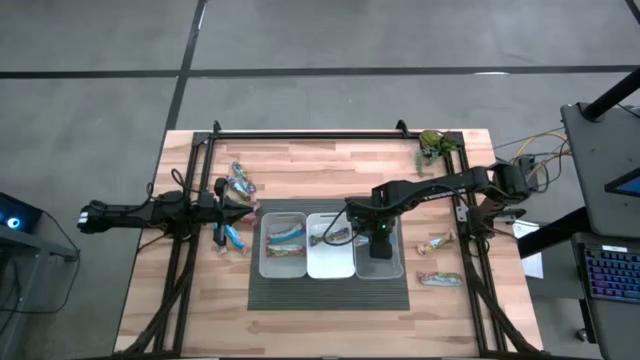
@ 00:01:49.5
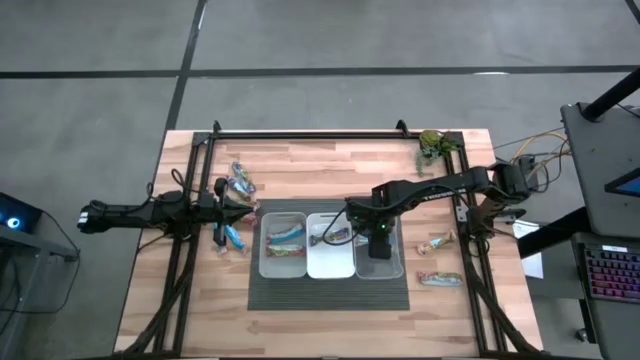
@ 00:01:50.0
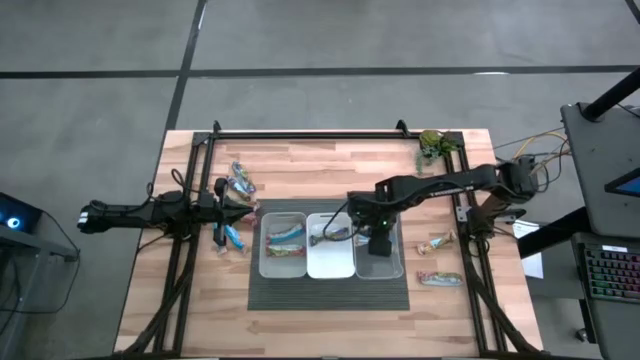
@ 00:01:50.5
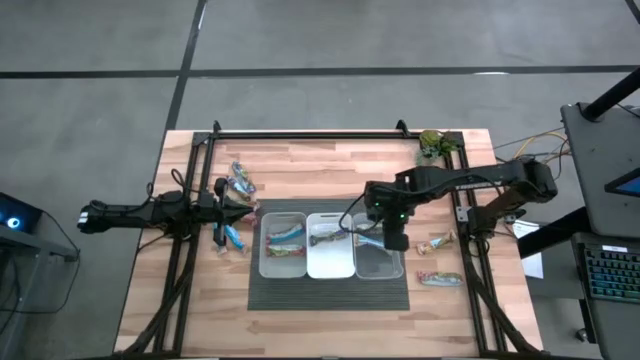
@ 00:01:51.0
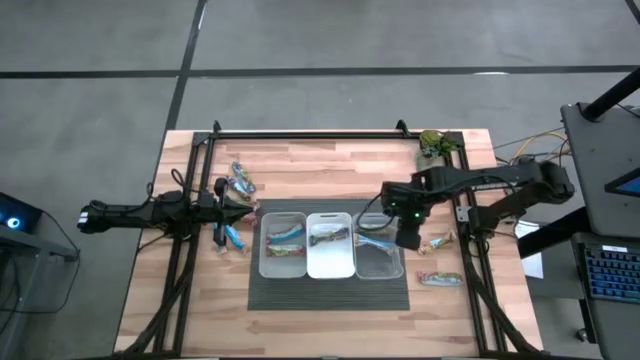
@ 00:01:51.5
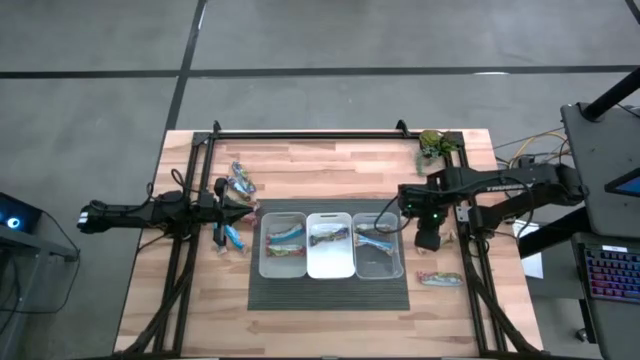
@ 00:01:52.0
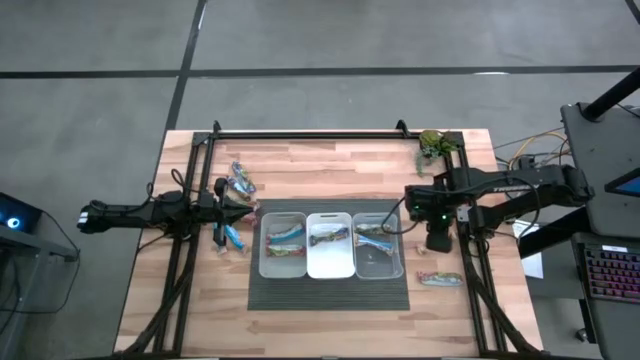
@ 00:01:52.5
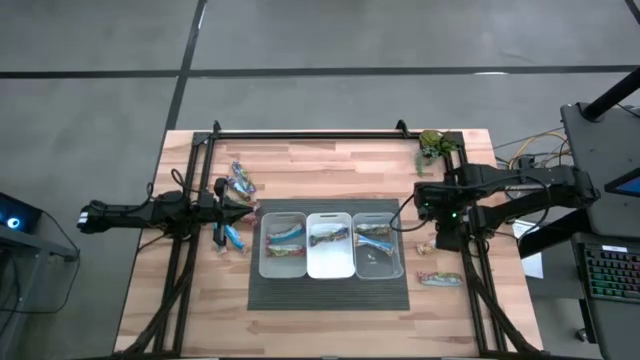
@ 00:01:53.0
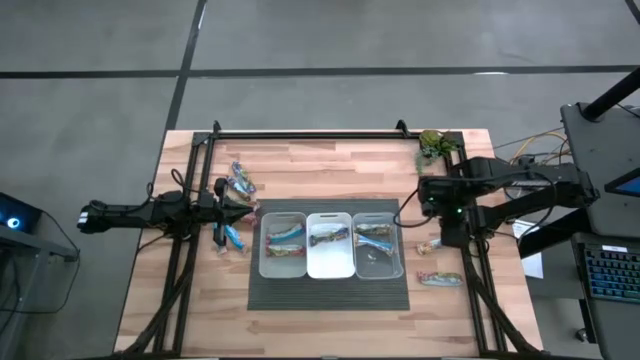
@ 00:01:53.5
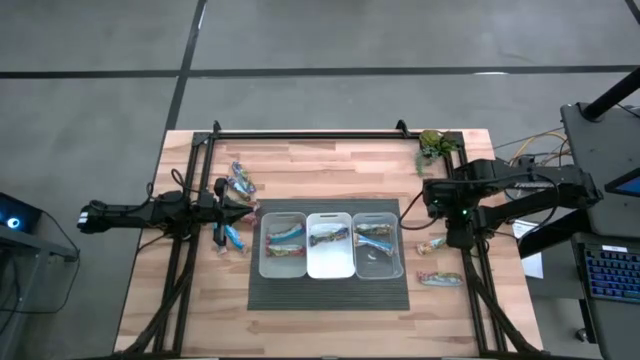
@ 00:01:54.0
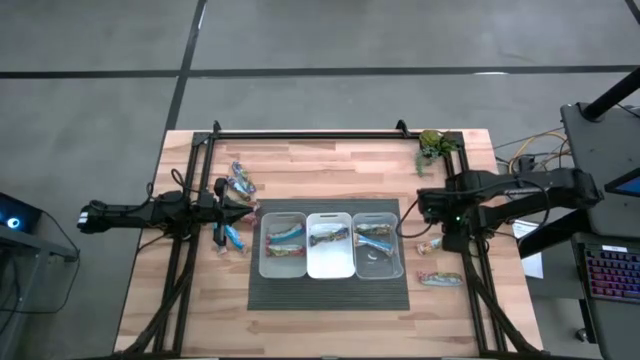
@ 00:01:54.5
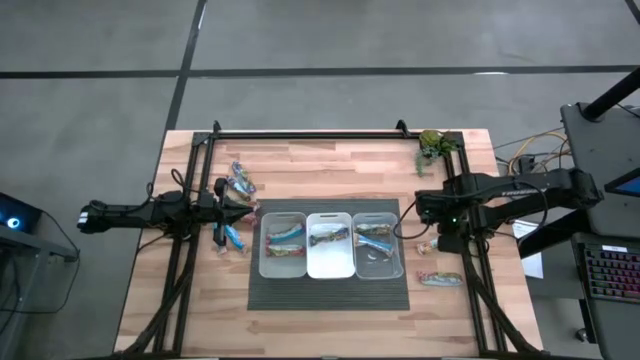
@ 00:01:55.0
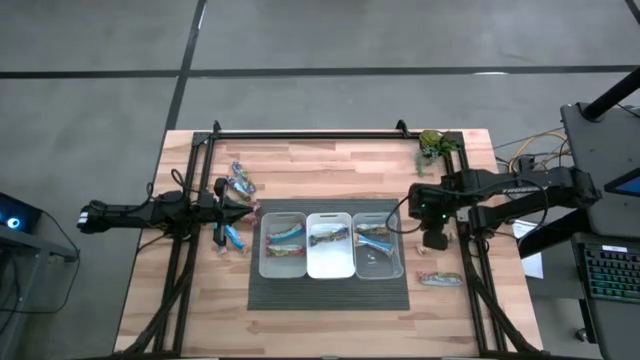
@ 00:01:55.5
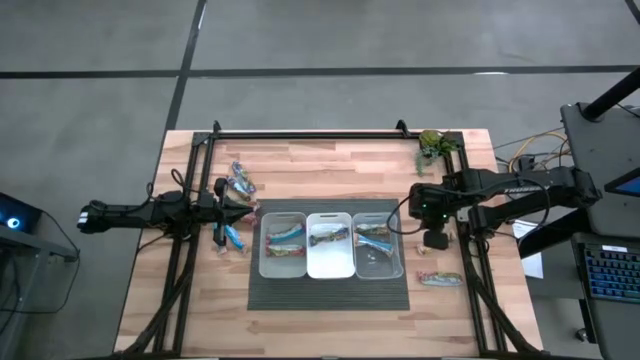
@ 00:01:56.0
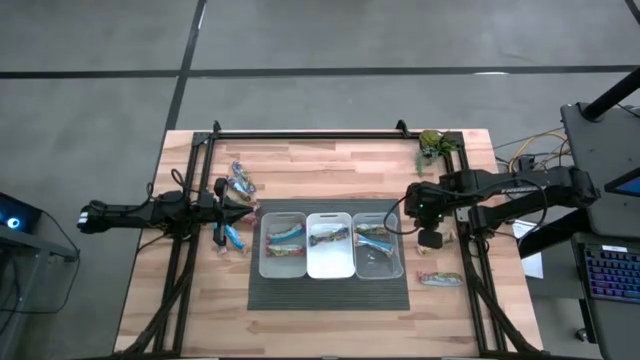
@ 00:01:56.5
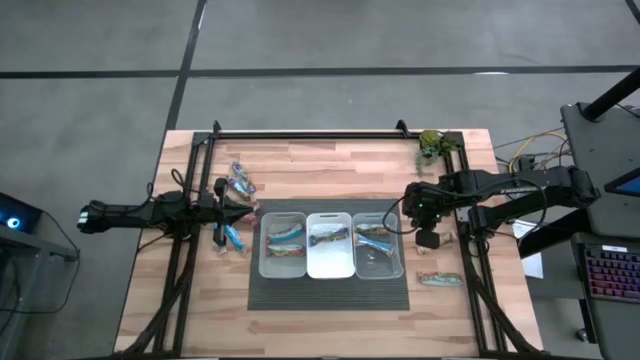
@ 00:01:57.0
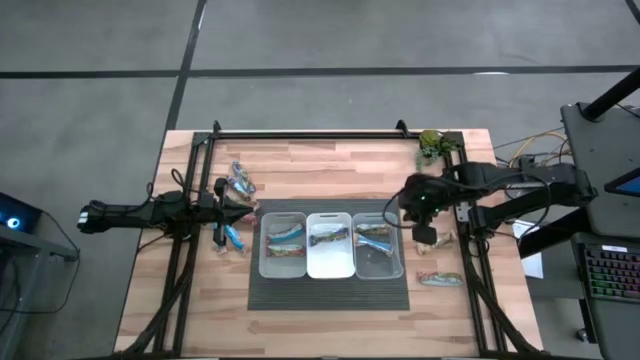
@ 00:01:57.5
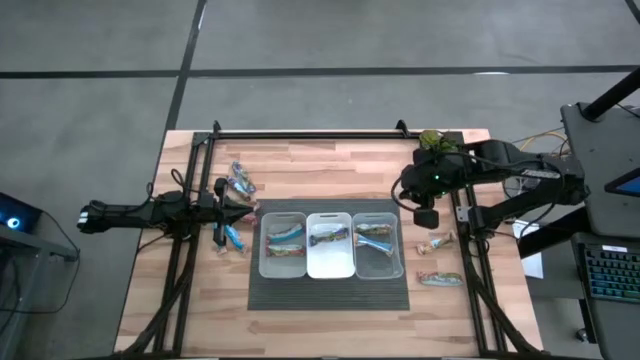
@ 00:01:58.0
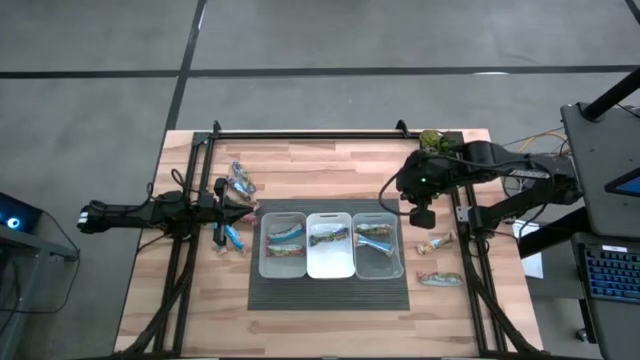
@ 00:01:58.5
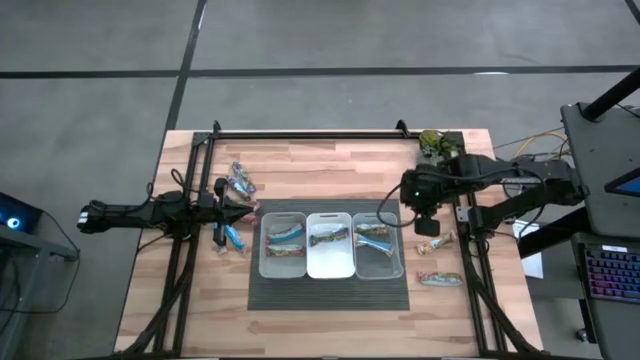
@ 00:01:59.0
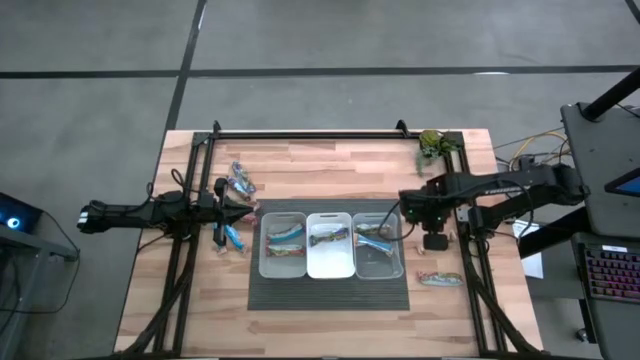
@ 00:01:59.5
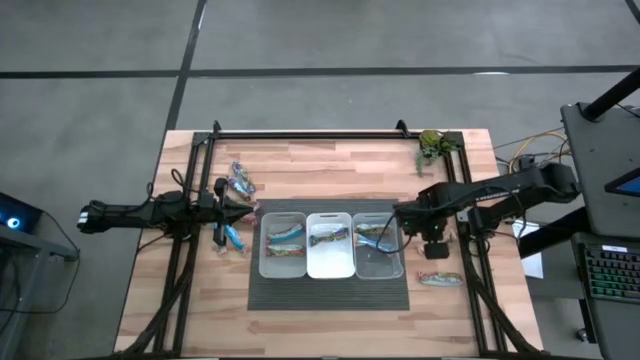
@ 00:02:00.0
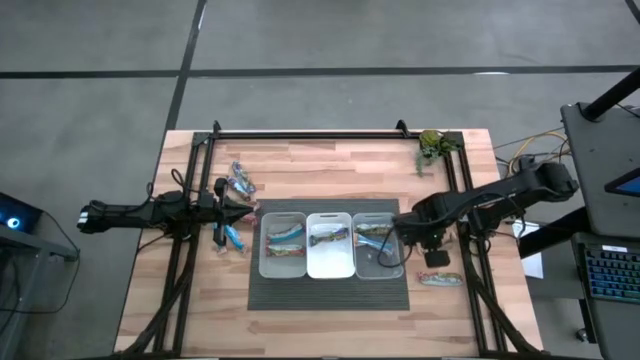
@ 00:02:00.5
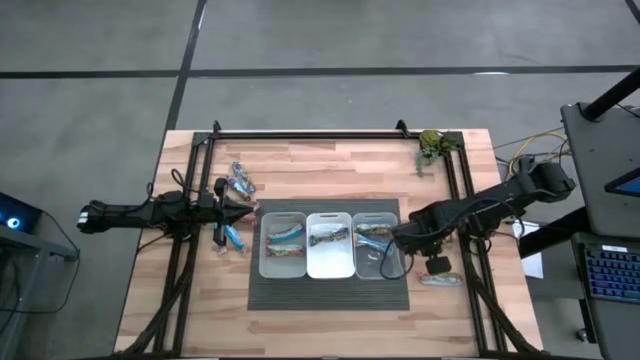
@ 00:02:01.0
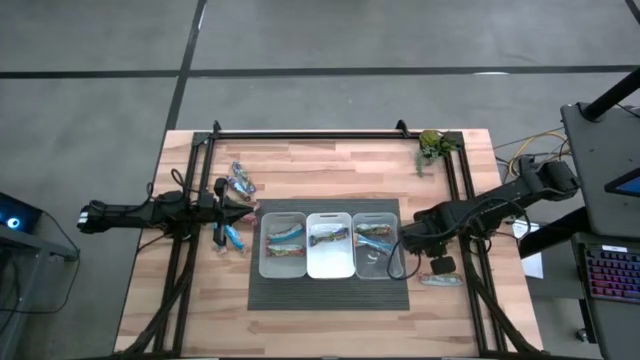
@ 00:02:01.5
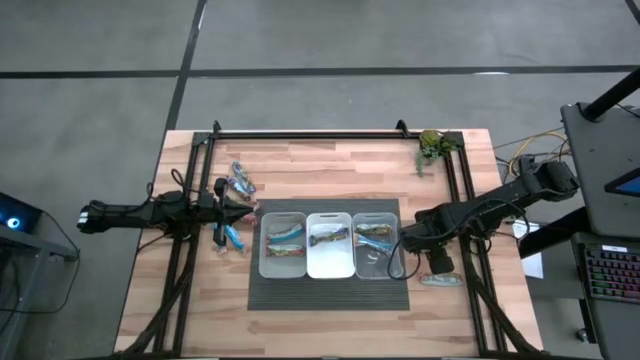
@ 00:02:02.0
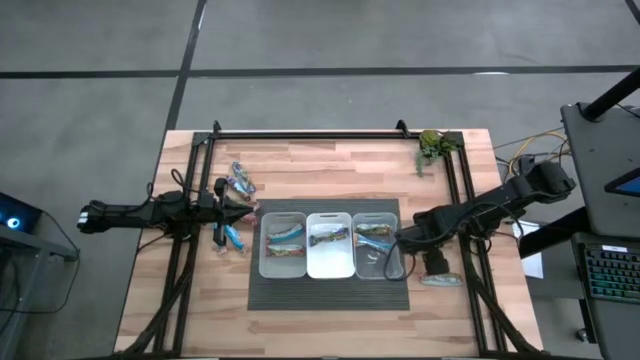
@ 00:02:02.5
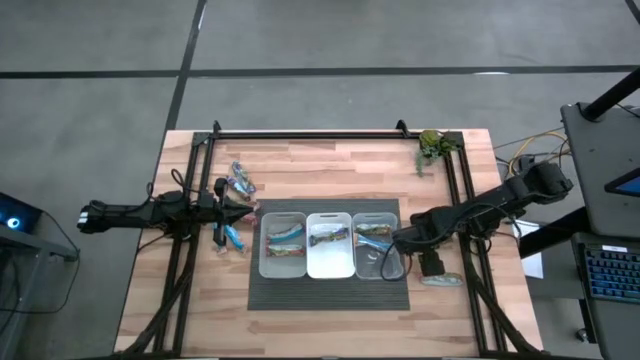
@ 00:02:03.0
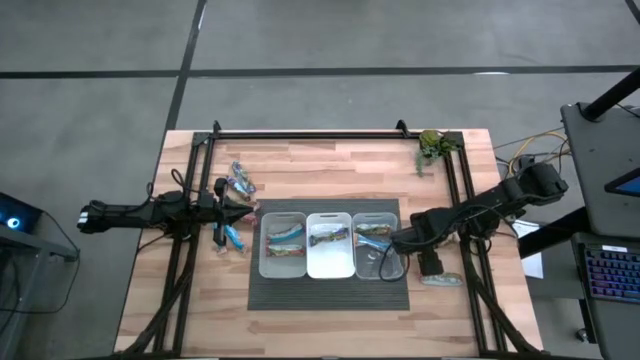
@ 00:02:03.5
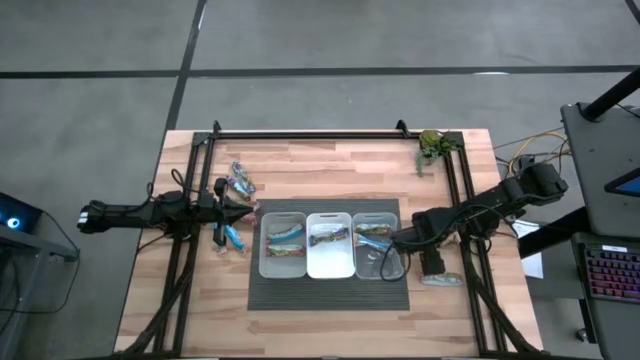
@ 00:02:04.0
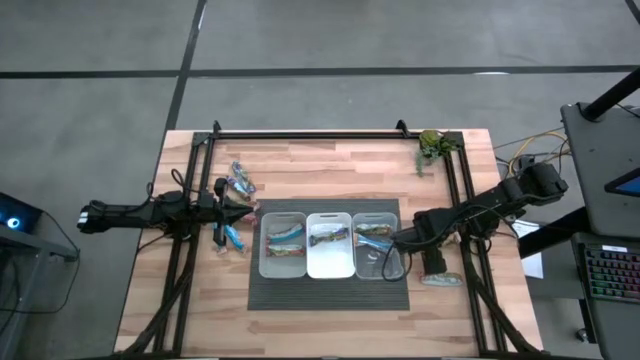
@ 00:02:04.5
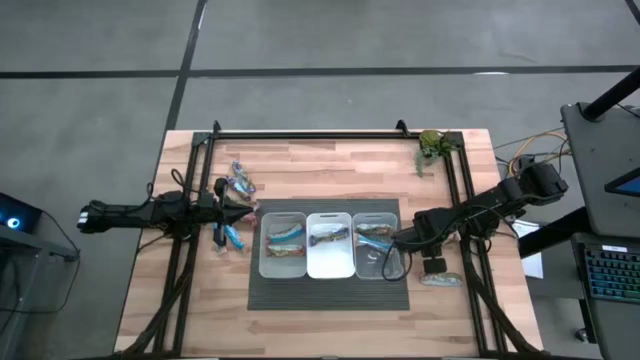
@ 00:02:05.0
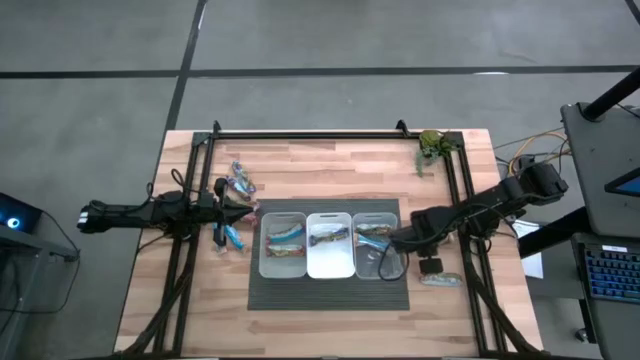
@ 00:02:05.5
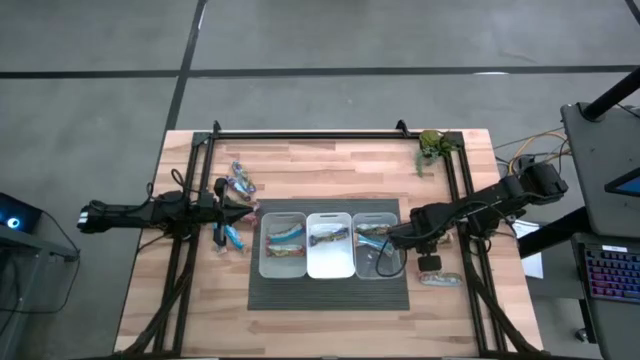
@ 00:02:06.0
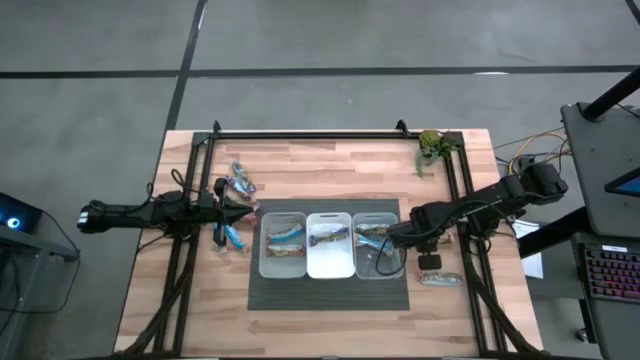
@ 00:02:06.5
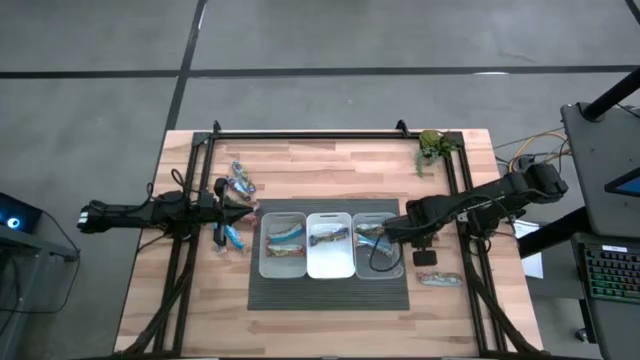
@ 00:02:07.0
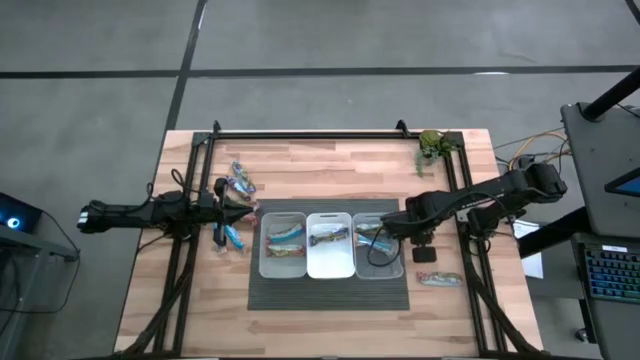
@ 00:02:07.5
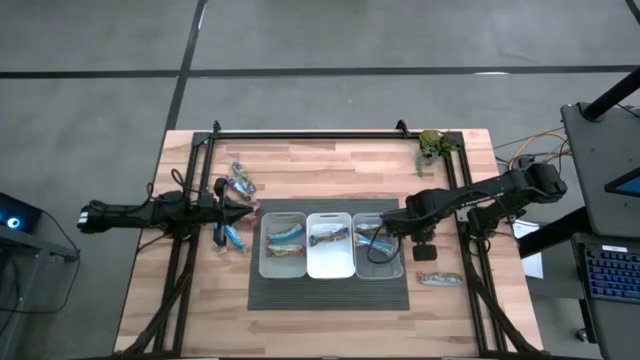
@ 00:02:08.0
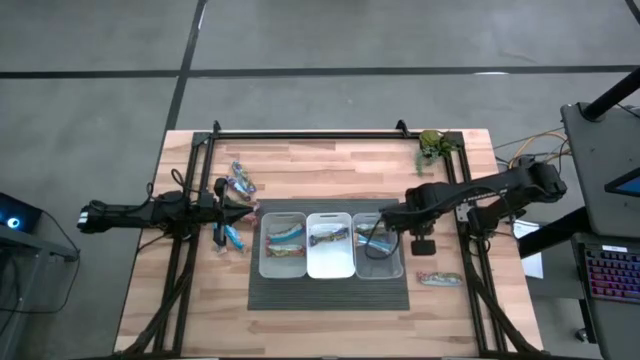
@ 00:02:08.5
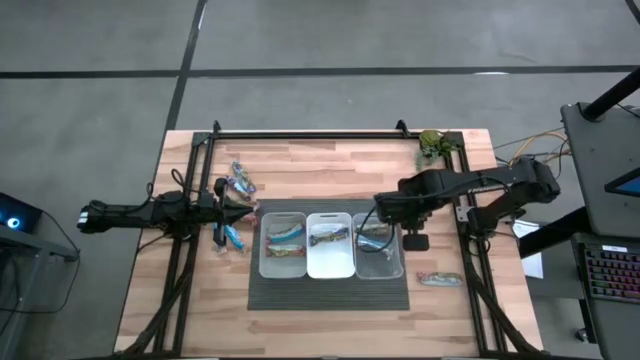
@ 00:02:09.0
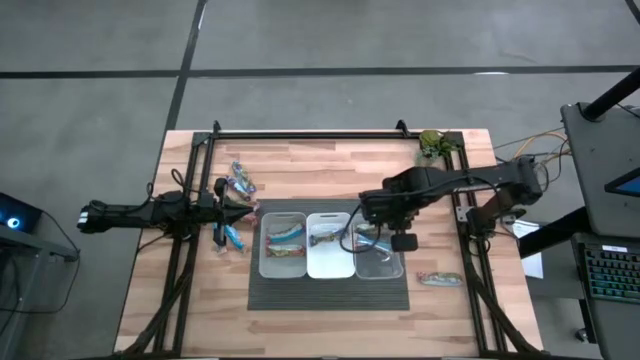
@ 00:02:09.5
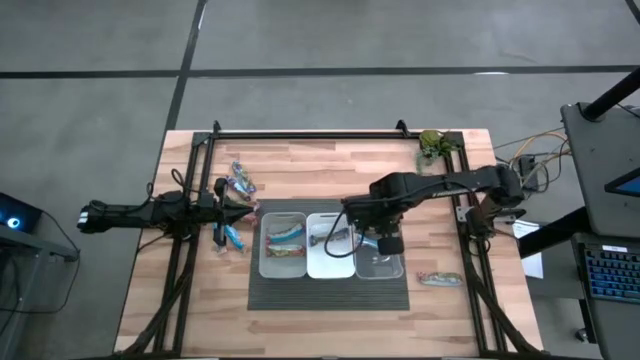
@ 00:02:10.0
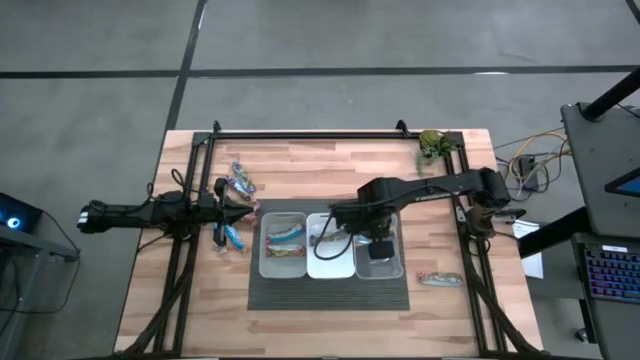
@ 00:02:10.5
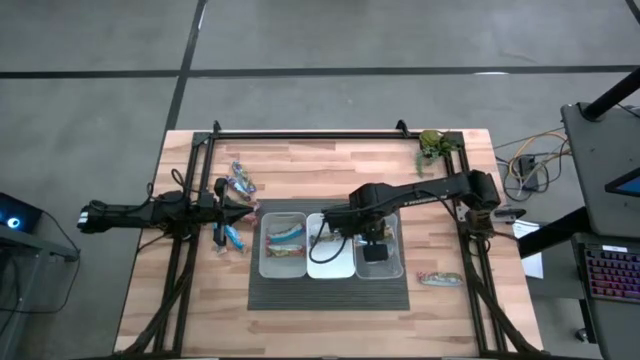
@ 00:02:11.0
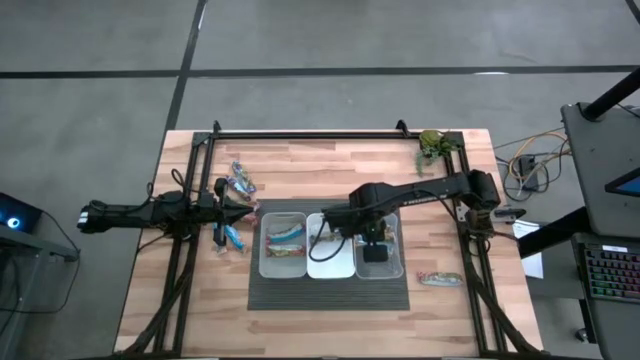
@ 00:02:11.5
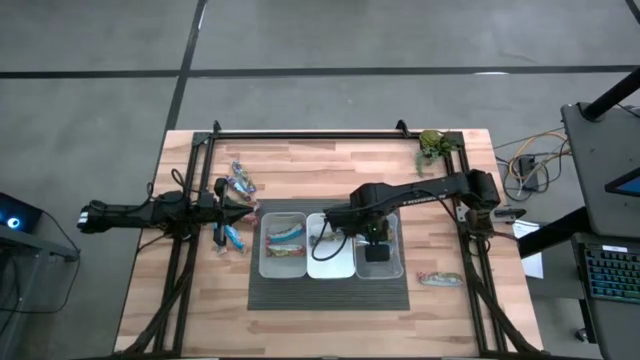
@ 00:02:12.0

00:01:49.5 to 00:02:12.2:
Task: Pick and place Granola Bars by type
Put the right yellow granola bar into the transparent bin
